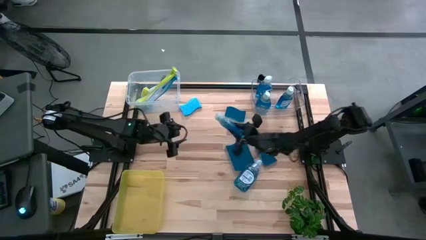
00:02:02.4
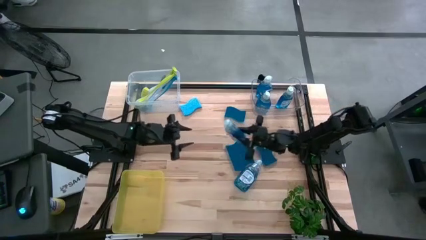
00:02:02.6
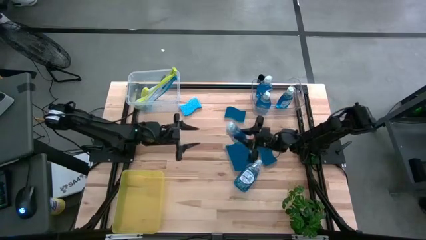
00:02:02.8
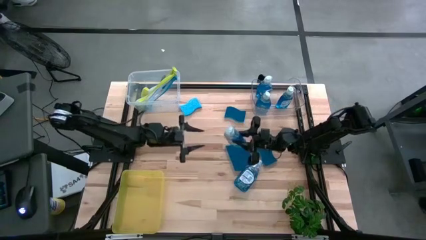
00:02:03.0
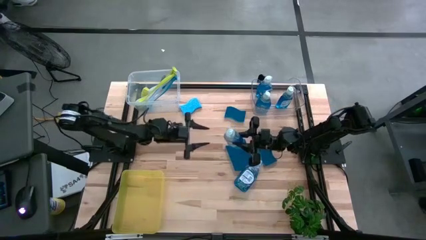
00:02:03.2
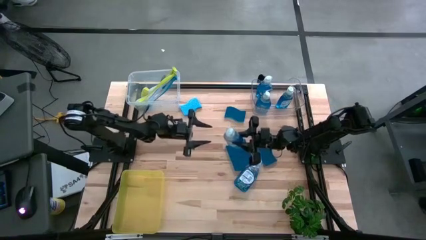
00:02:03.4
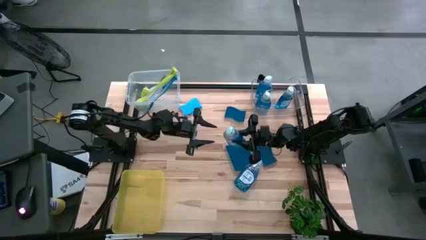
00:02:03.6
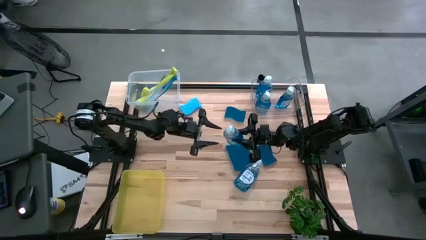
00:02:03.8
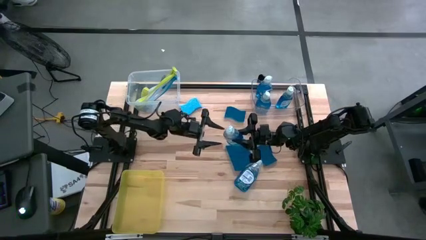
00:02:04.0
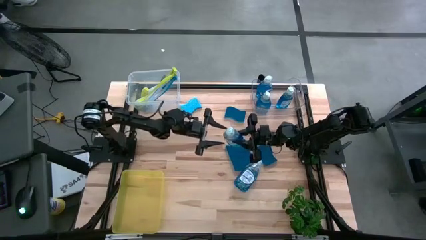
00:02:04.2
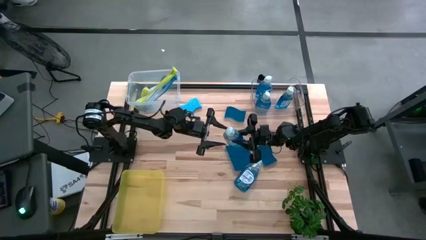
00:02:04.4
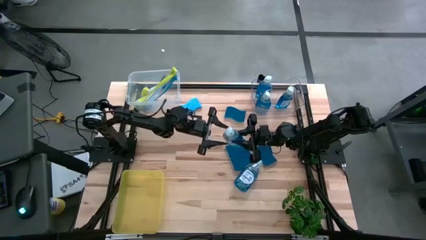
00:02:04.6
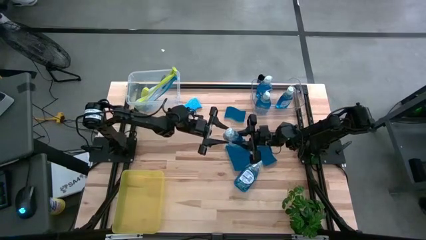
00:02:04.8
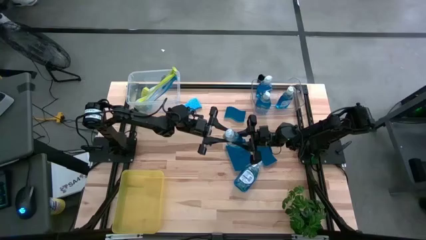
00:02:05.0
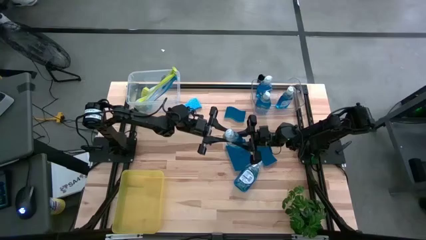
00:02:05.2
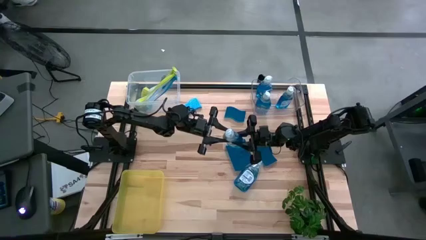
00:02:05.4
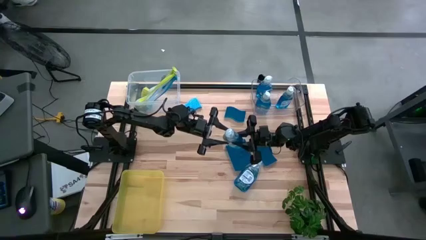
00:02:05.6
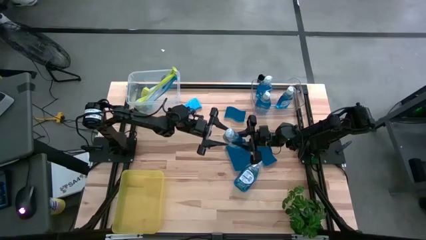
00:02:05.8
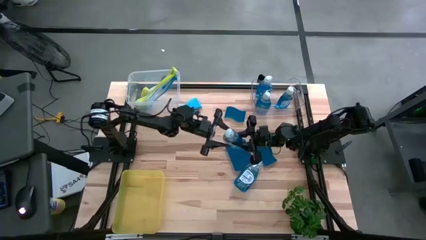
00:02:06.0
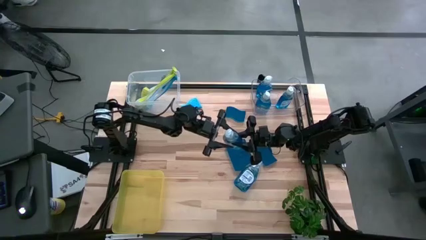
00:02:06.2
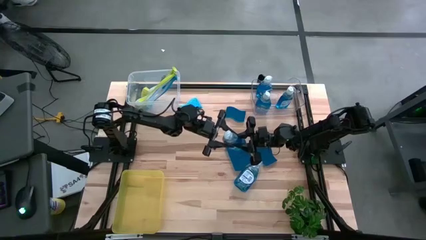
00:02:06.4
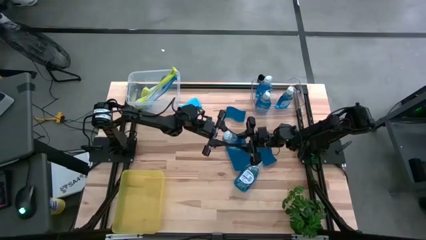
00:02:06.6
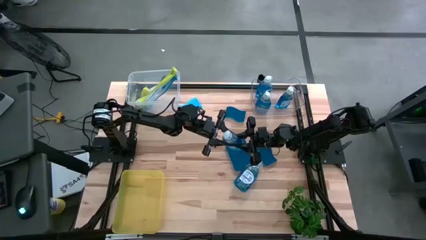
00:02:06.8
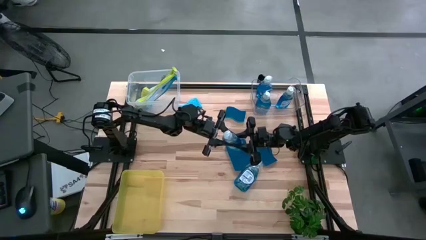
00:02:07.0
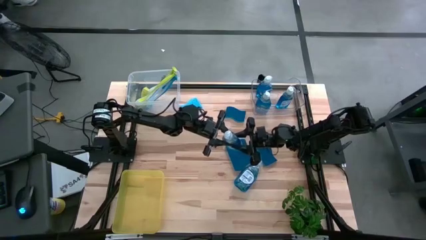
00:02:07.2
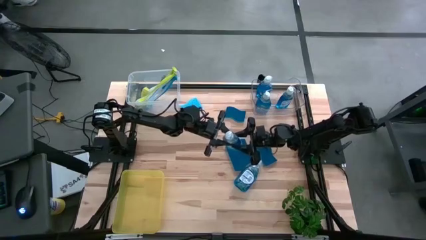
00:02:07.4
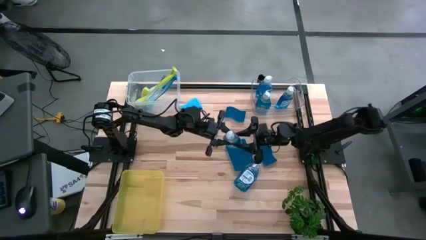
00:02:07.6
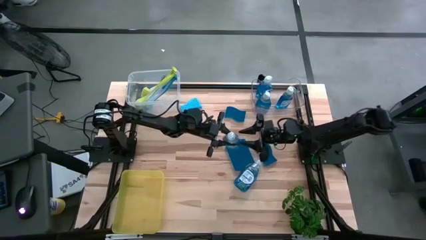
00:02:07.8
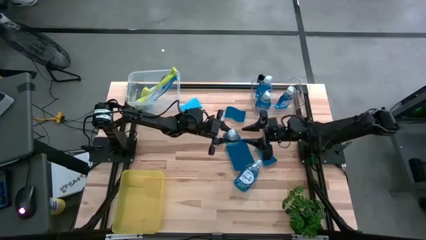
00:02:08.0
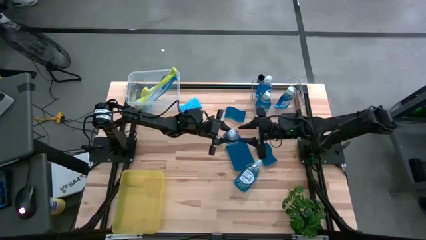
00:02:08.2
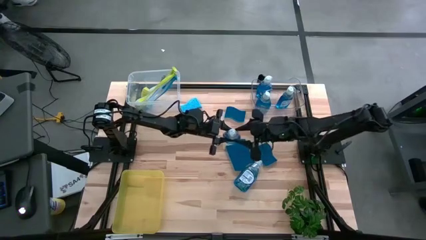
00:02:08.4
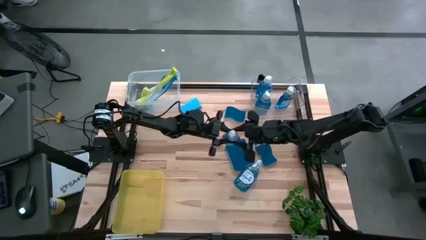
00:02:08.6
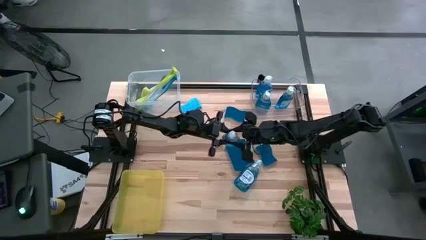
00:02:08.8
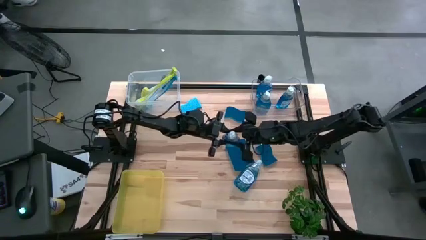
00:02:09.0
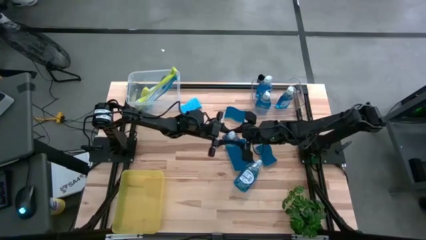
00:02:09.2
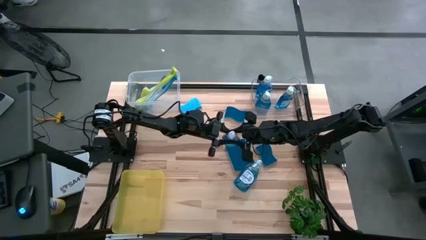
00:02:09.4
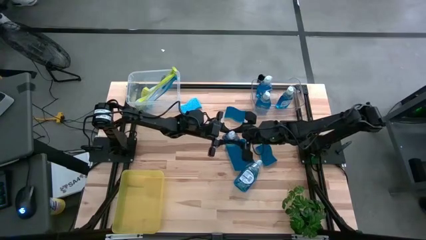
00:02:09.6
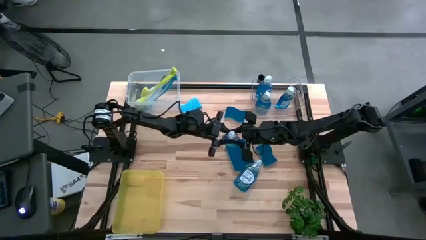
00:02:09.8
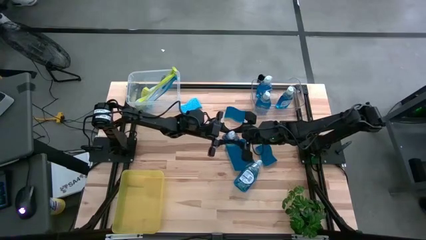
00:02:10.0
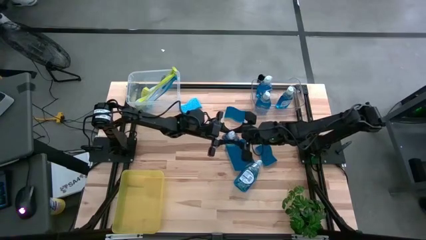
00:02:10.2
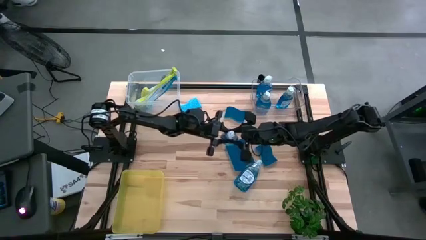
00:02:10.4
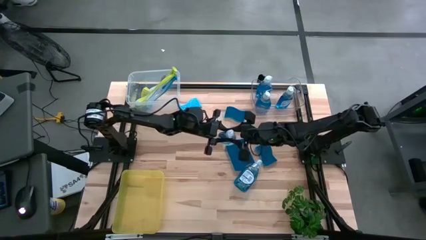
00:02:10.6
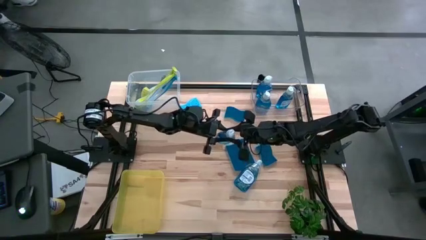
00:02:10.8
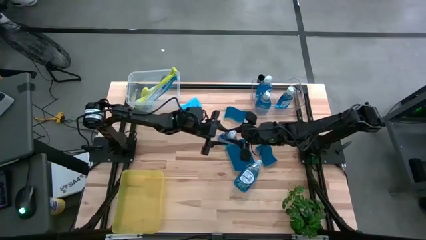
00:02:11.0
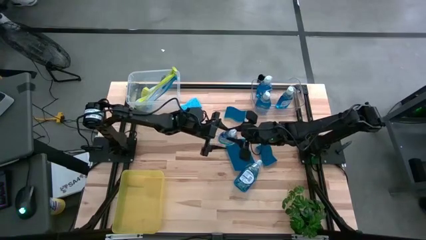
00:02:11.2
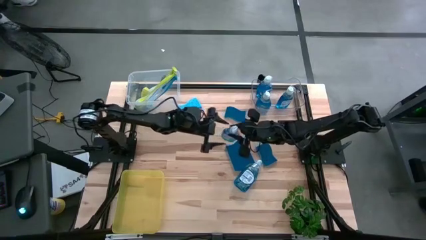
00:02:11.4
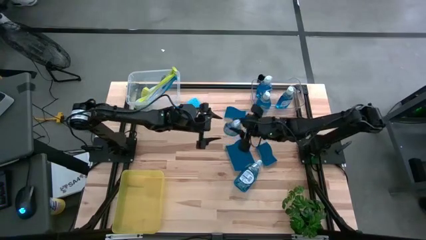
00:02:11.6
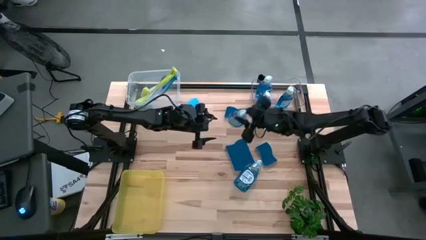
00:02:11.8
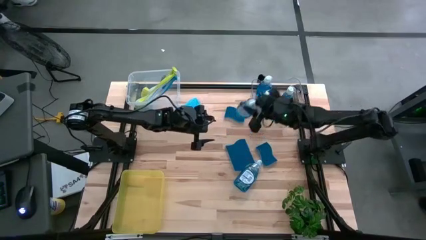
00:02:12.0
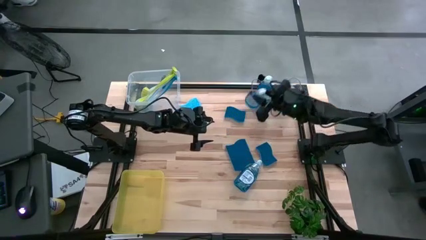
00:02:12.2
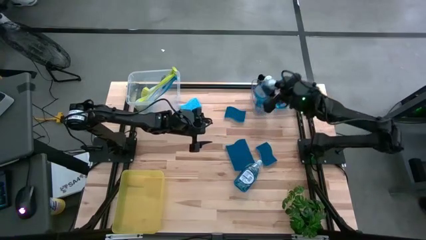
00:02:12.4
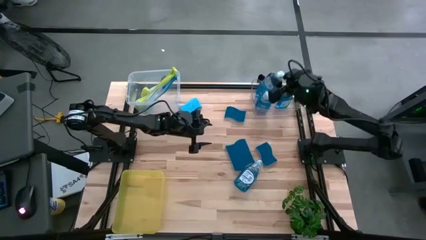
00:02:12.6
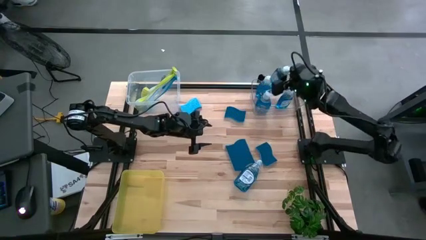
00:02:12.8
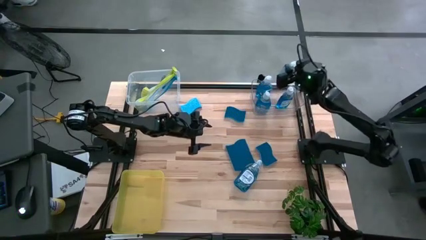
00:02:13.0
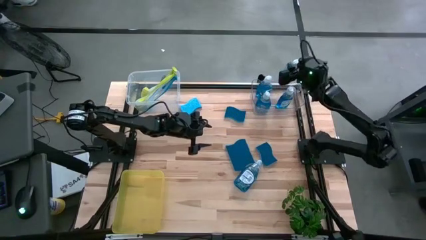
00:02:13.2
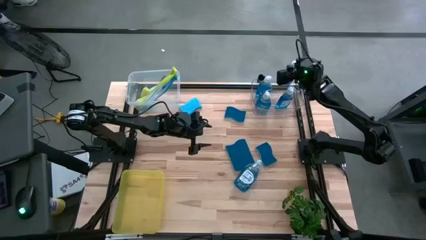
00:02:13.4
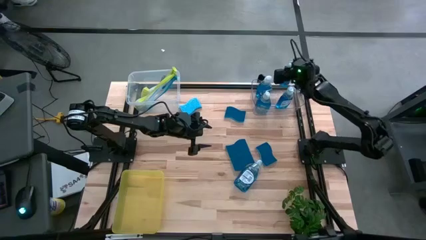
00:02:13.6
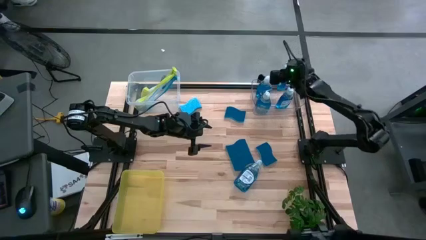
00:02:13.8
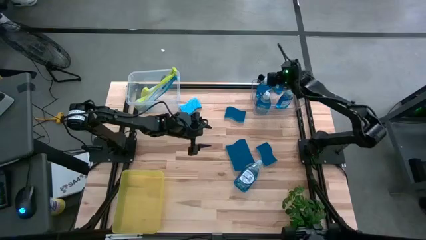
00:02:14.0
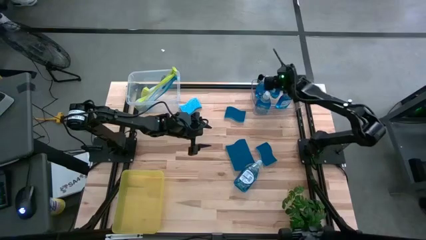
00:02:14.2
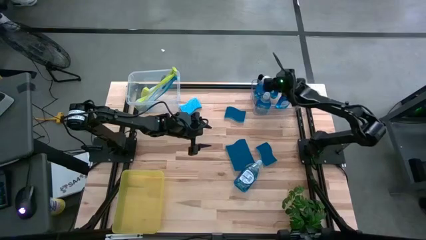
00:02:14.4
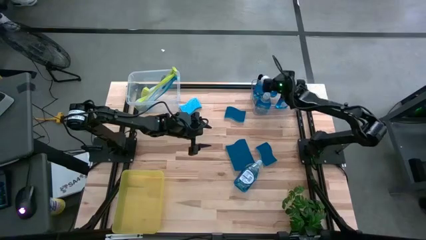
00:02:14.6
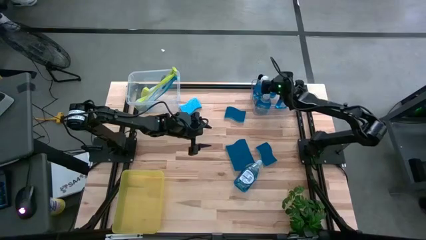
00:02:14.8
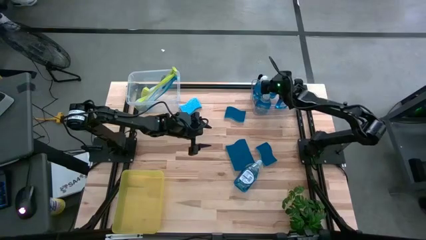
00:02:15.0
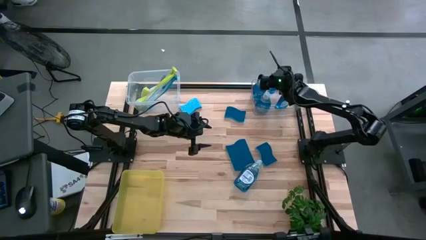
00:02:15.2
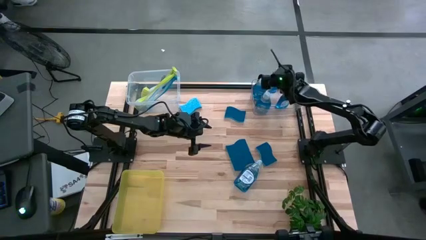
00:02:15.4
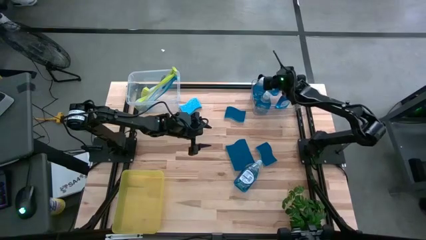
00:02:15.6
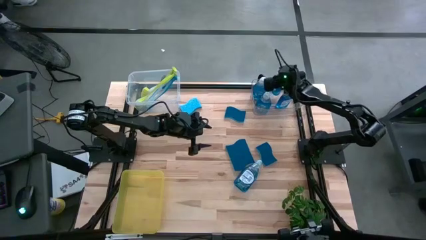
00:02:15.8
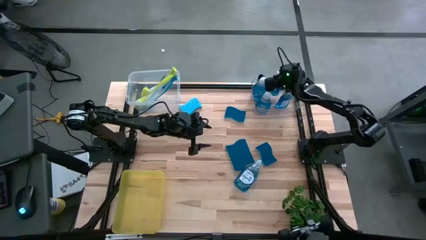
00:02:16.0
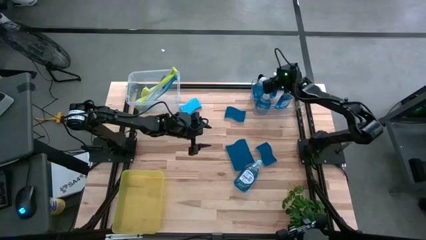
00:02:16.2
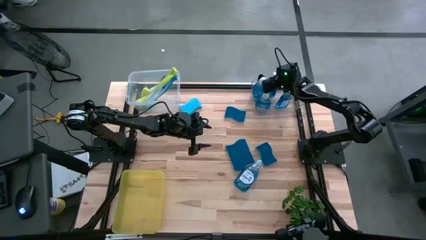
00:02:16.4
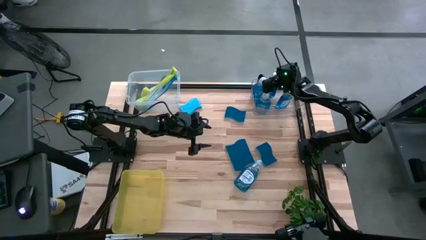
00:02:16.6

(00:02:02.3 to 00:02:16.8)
Task: Pick & Place Kitchen Sink Supplies
Put the left soap dispenser into the transparent bin

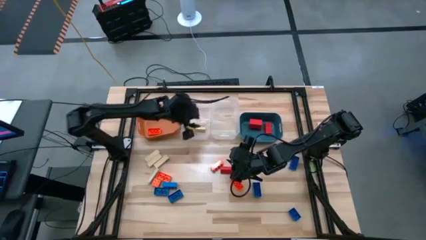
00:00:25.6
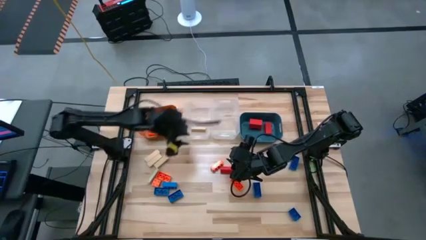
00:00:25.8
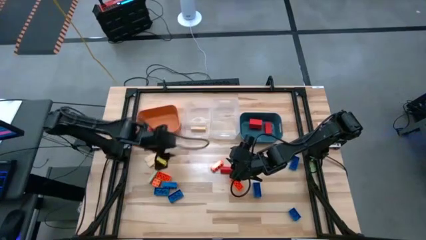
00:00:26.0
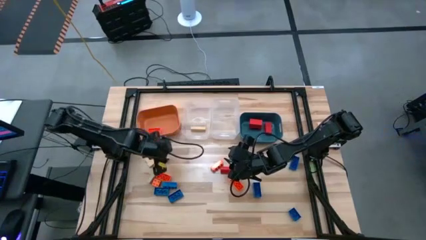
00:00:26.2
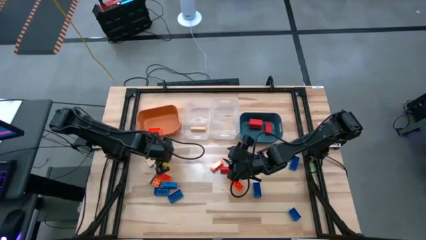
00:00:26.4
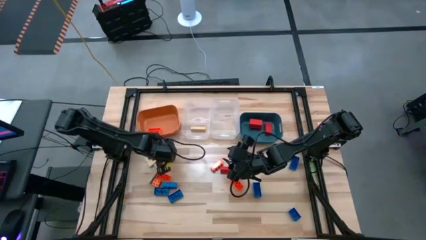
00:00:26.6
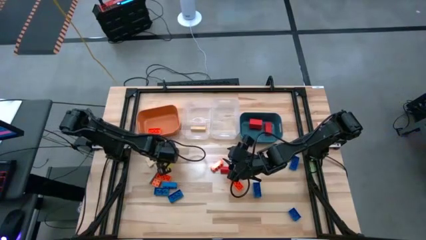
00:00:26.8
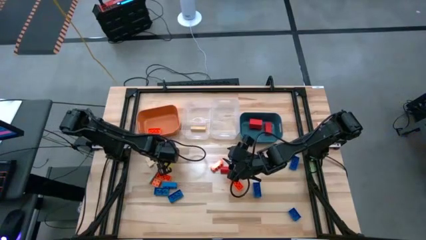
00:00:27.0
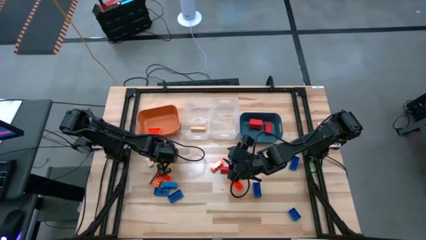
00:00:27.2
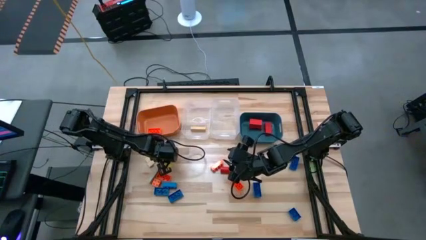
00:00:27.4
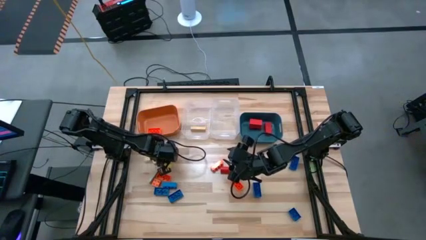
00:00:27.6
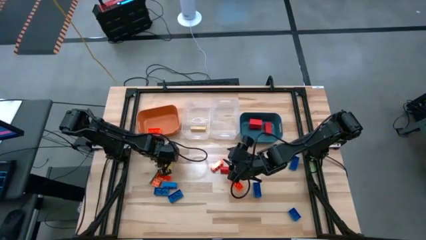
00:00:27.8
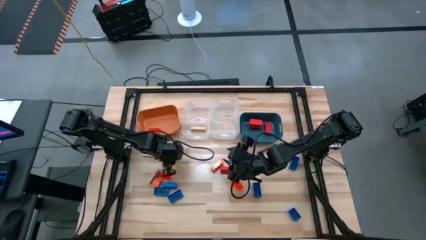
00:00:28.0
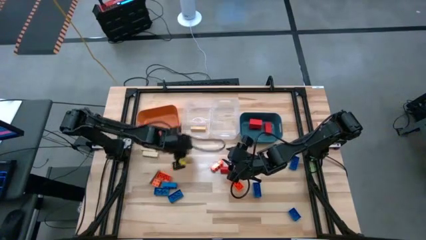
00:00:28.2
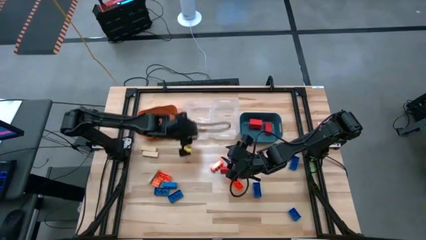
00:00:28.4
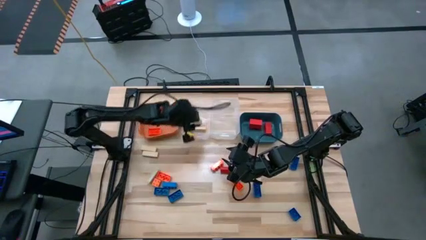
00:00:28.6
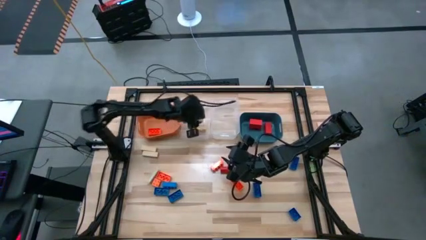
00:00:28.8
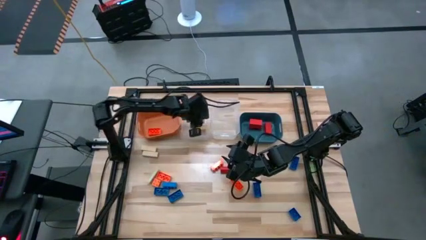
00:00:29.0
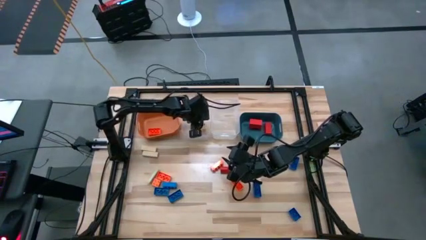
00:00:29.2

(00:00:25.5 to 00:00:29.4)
Task: Sort blocks
Put the brown block into the left transparent bin
